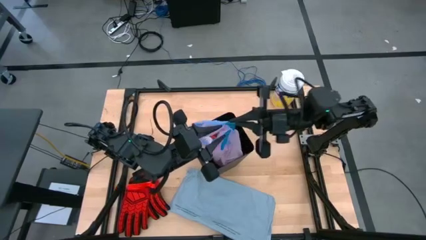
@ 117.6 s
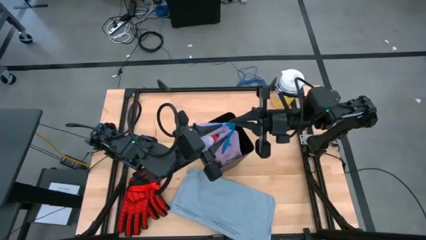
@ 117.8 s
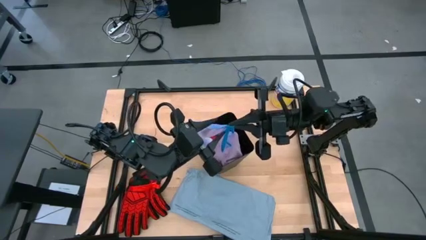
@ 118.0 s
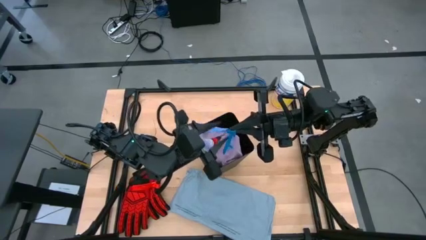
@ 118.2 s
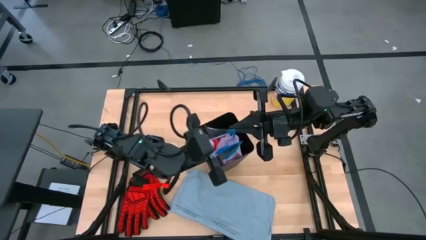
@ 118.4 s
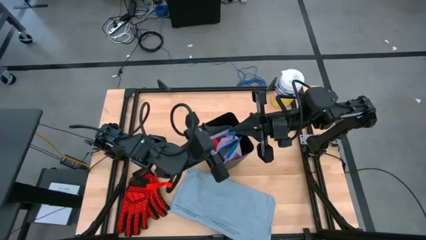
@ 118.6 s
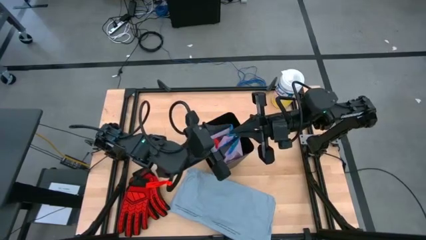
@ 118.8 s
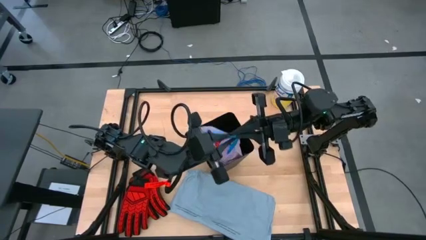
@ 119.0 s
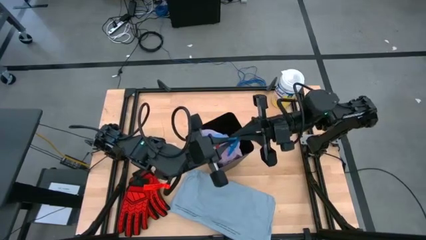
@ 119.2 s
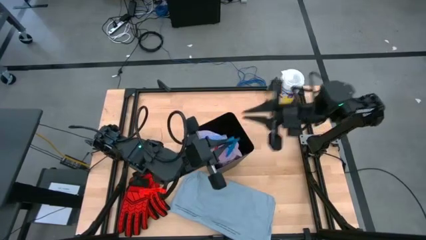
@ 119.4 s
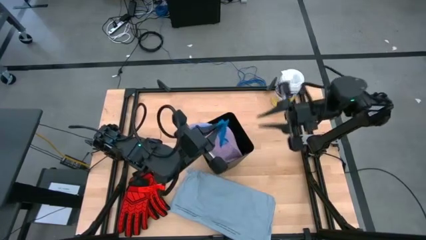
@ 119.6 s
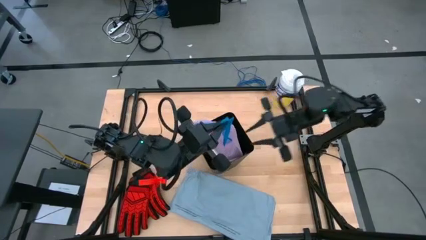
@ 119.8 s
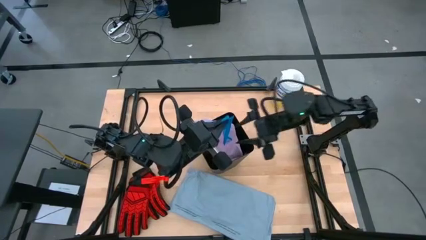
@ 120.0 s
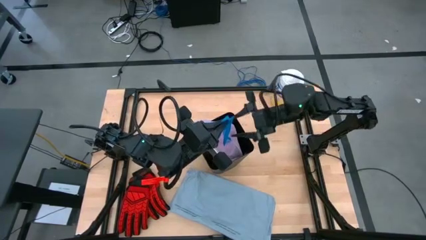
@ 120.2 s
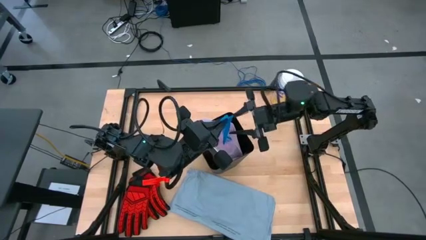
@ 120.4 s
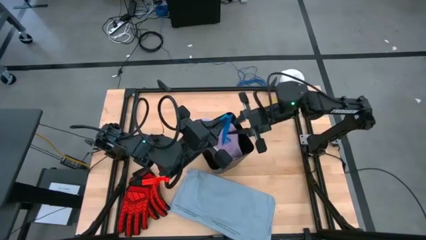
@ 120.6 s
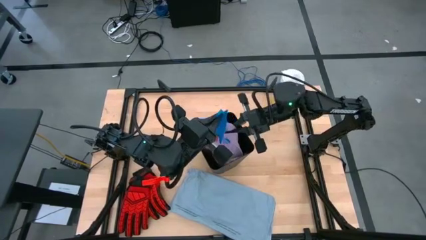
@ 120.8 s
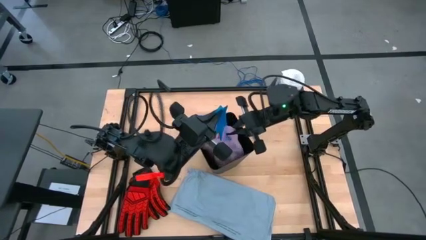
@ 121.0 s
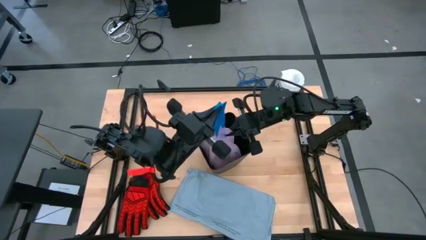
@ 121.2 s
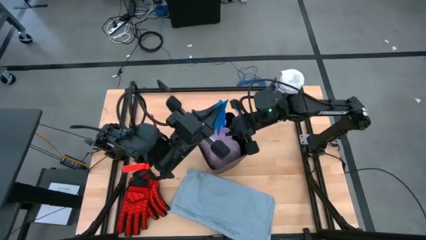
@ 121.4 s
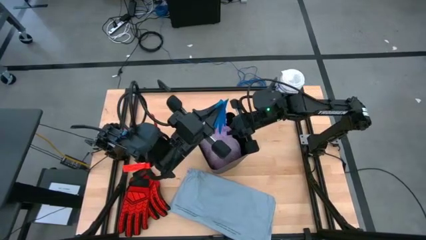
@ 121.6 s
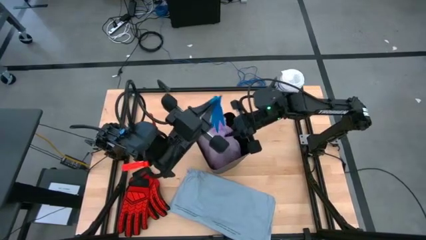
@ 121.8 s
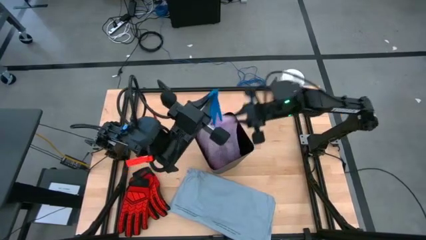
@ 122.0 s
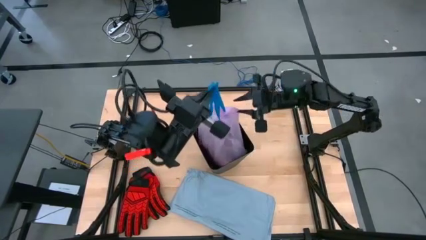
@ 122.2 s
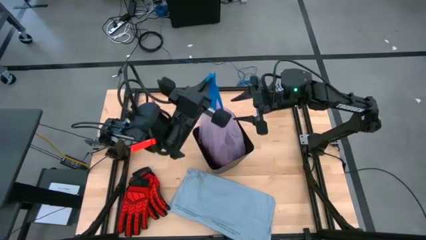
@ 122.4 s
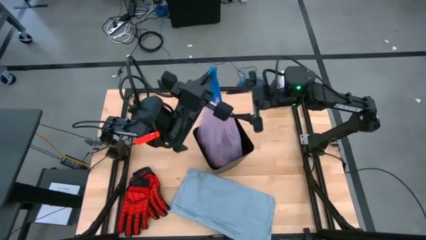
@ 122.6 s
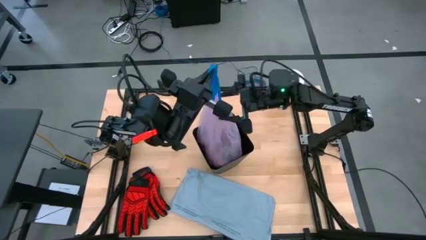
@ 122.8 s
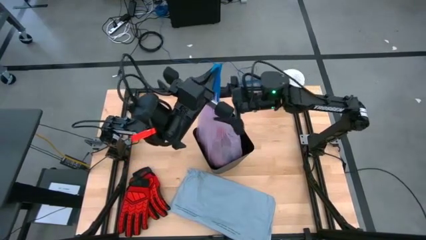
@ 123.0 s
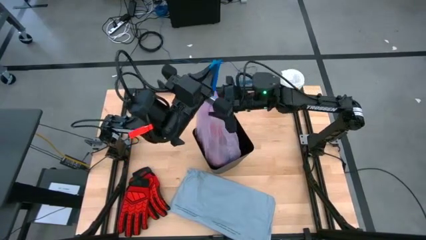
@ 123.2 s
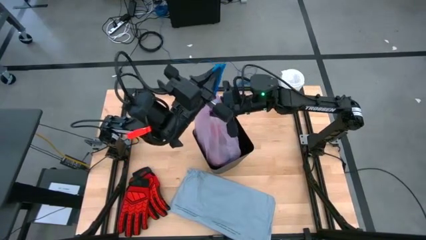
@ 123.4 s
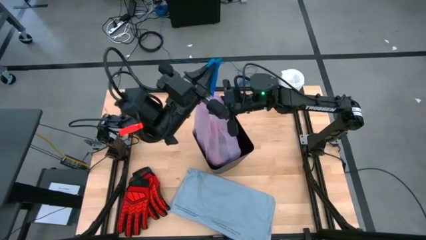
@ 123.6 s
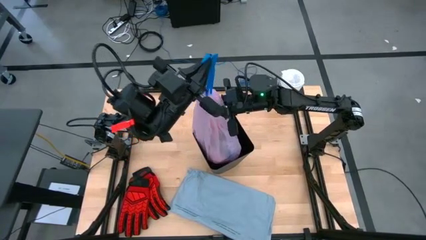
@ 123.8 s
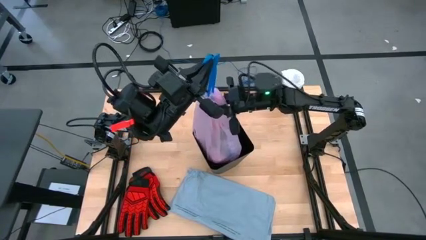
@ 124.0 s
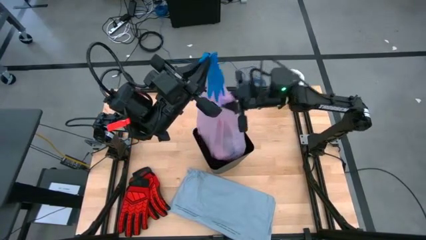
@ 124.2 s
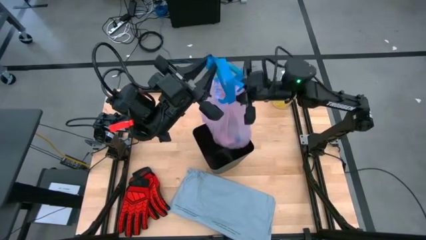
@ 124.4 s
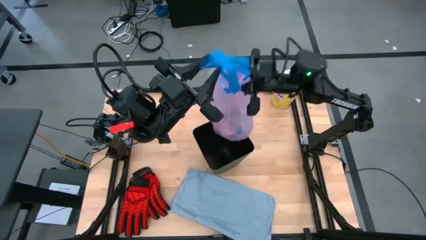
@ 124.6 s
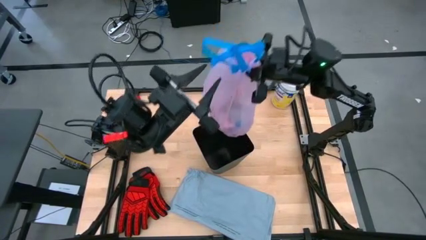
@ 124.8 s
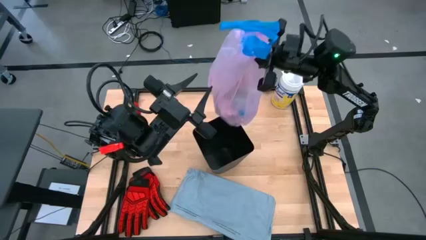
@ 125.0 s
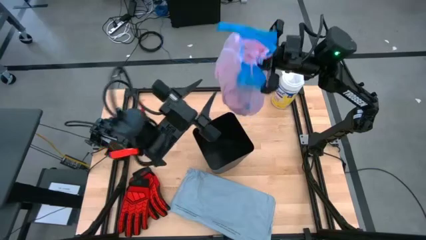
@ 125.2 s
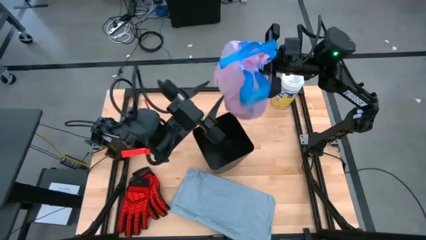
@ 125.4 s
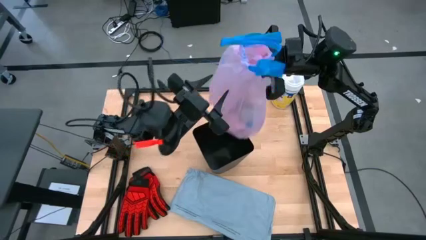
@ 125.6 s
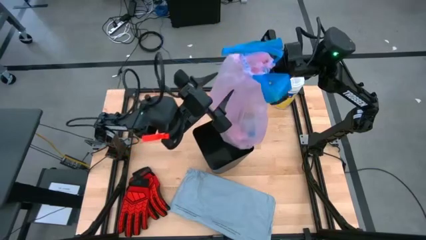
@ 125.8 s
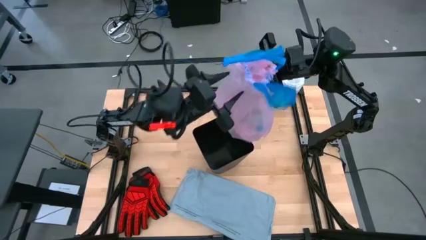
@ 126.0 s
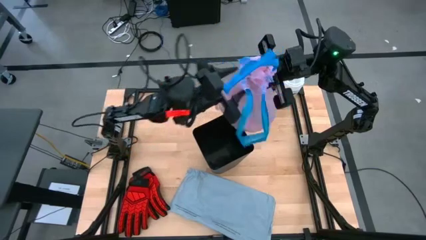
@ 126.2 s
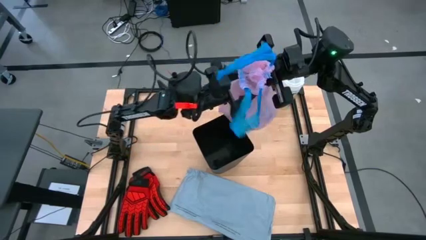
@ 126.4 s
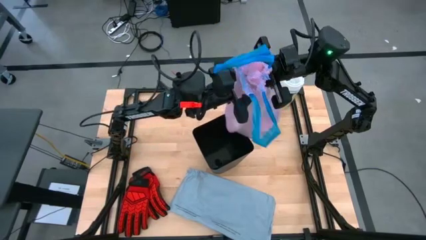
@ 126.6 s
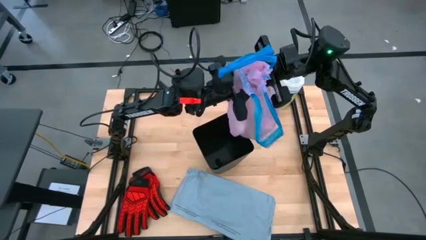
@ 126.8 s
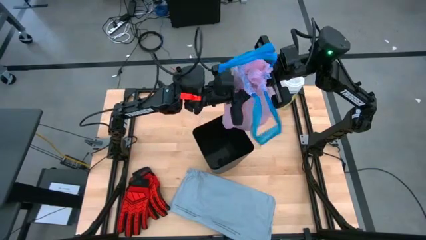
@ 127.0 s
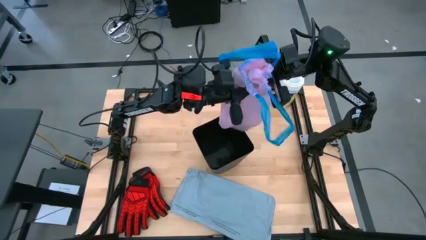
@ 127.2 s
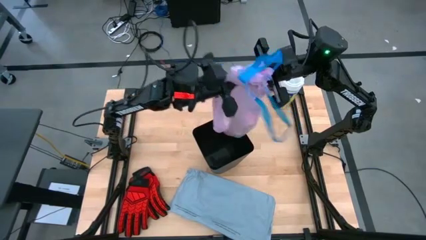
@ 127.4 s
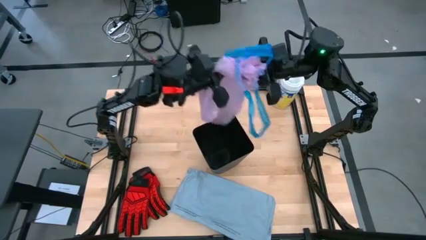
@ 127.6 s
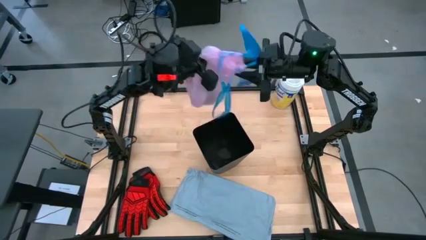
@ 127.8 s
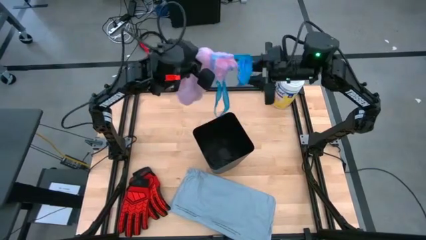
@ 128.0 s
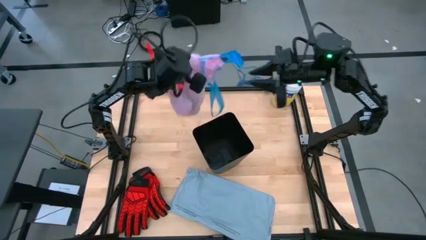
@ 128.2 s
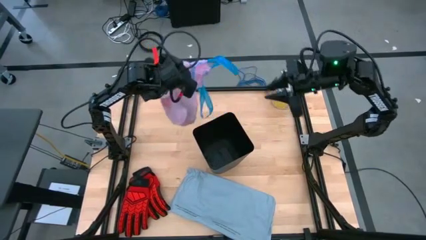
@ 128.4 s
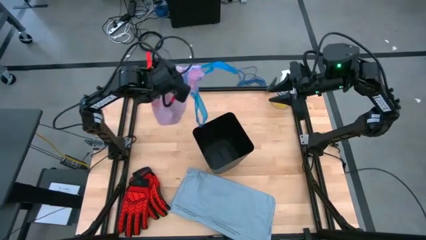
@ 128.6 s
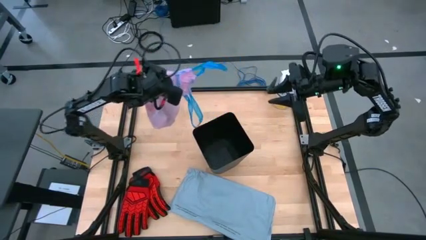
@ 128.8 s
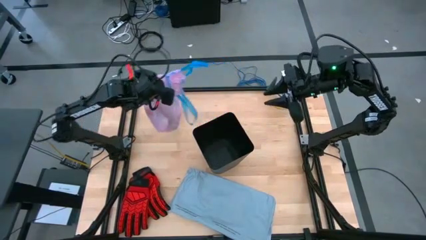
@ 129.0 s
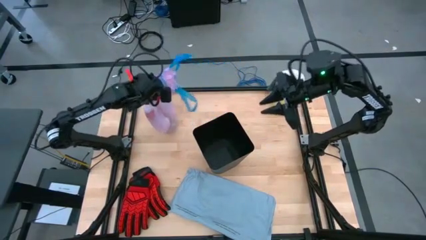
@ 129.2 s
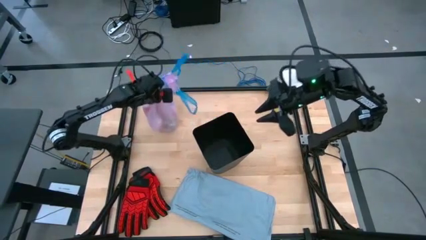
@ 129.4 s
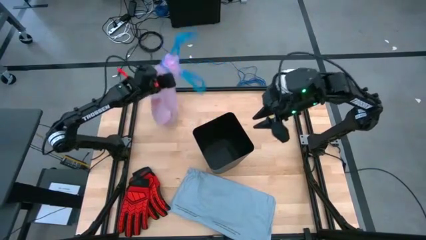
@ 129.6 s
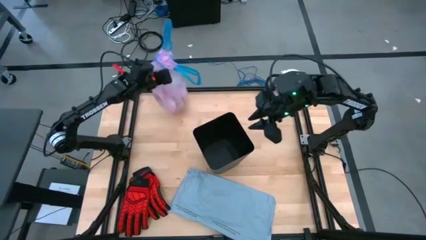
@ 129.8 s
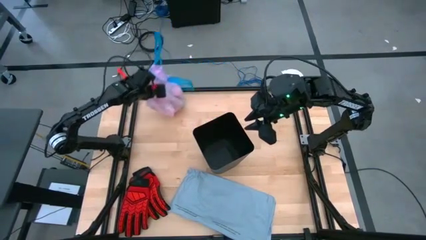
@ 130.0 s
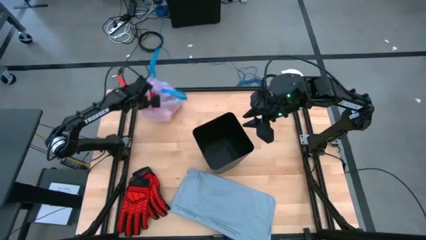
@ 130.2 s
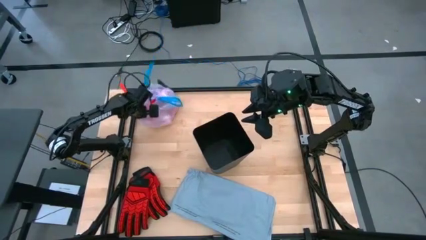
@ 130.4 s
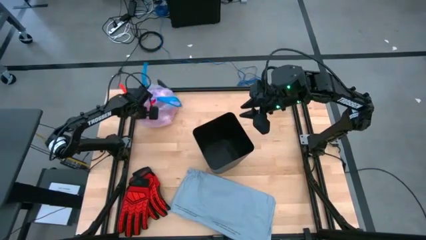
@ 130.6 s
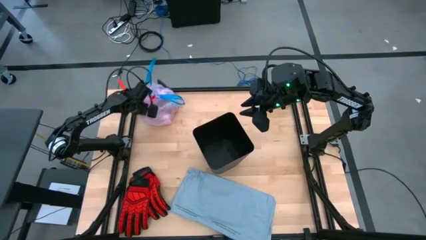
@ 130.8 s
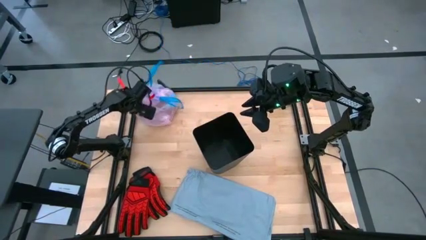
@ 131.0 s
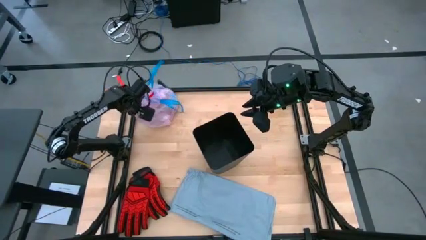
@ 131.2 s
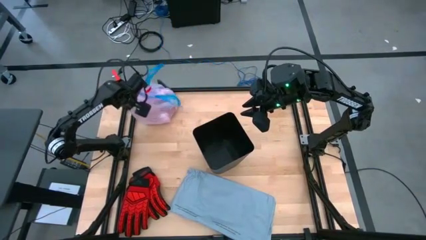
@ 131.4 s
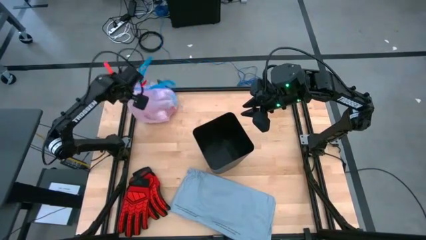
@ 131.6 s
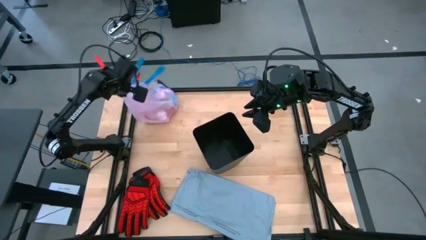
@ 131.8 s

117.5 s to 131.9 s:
Task: place trash/remove bag and relplace
Remove the pink trash bag from the trash bin

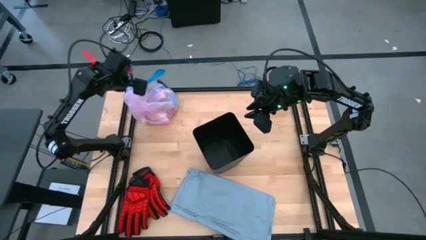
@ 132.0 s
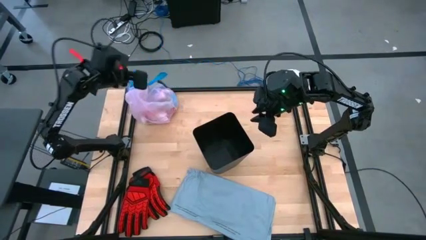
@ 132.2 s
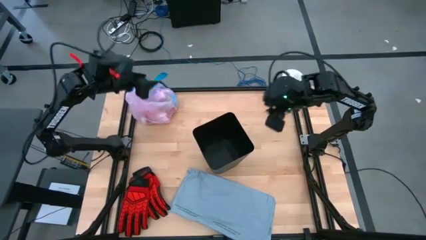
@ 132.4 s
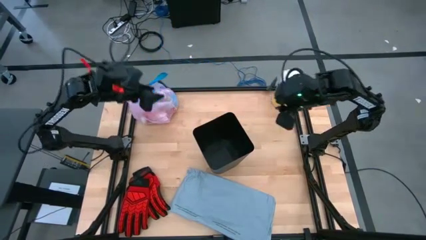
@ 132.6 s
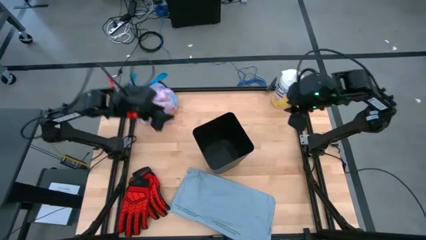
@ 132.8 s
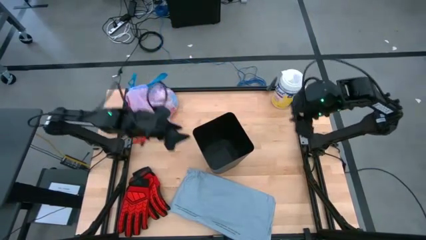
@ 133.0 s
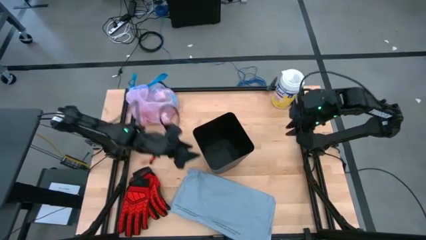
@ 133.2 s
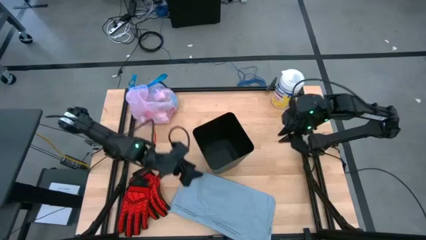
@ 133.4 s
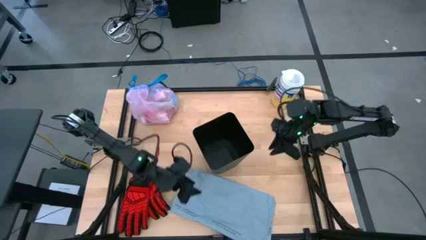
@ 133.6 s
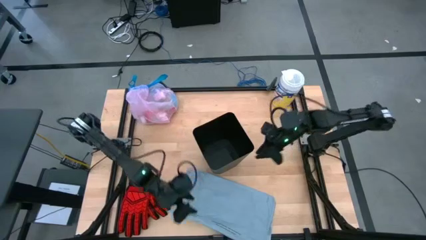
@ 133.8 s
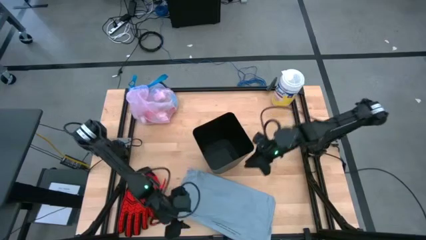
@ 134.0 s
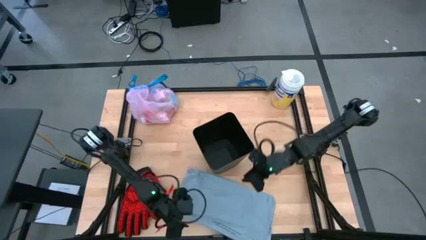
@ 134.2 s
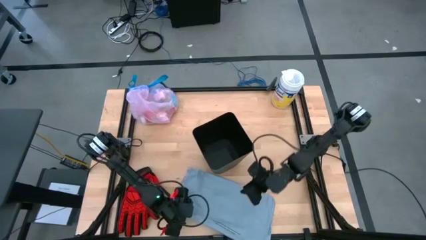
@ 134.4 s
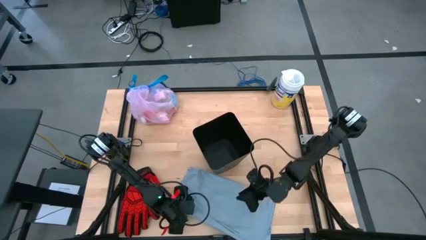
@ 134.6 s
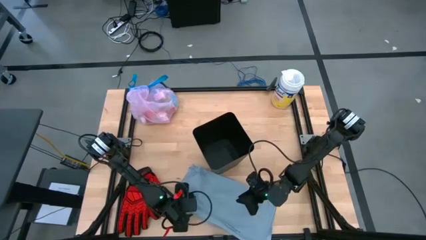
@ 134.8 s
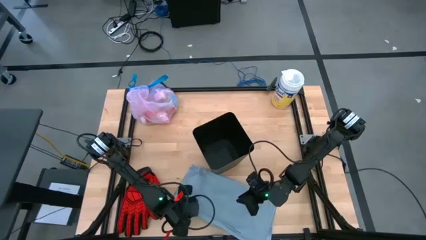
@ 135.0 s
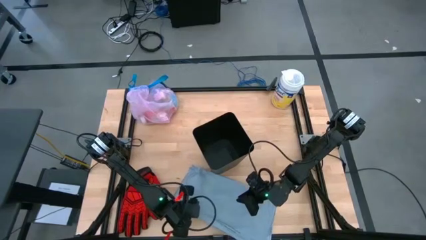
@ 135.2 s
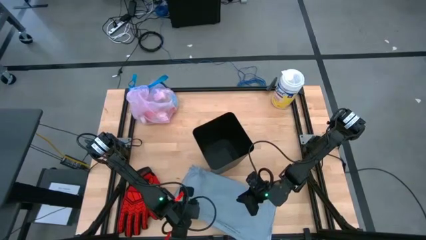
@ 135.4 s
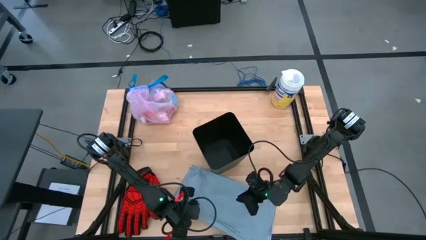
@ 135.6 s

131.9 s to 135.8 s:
Put the gray trash bag into the trash bin
